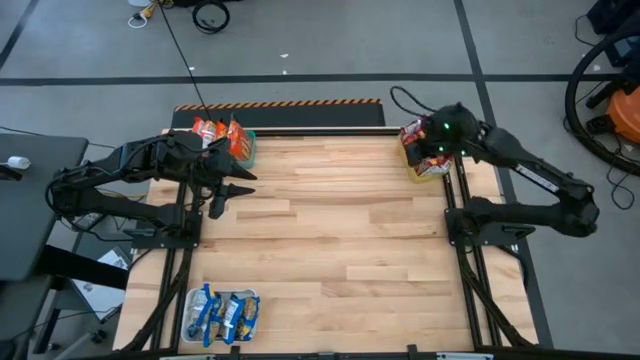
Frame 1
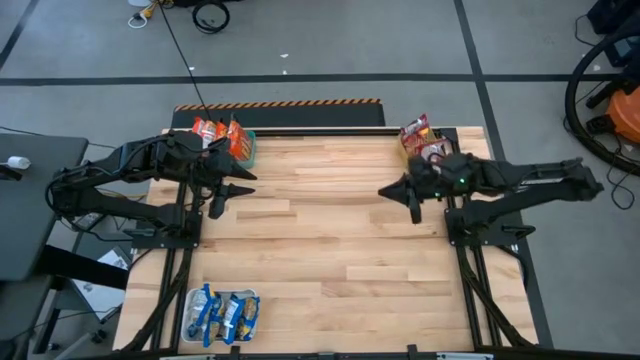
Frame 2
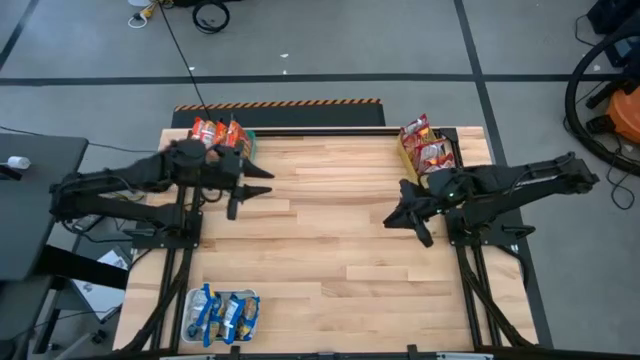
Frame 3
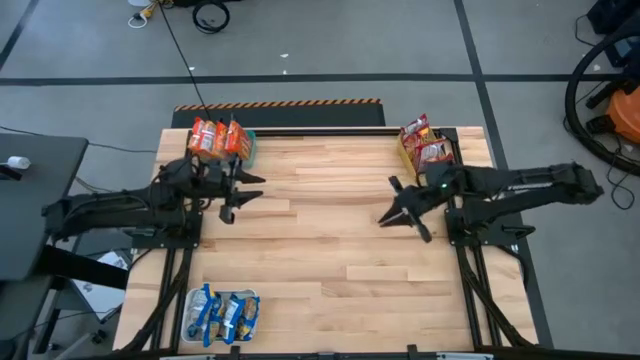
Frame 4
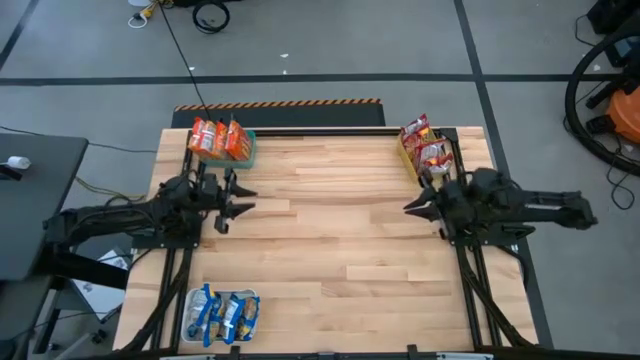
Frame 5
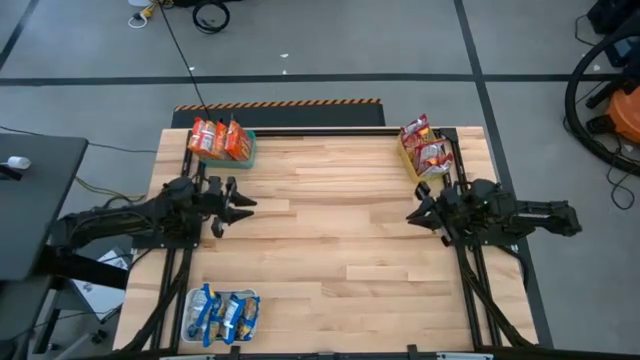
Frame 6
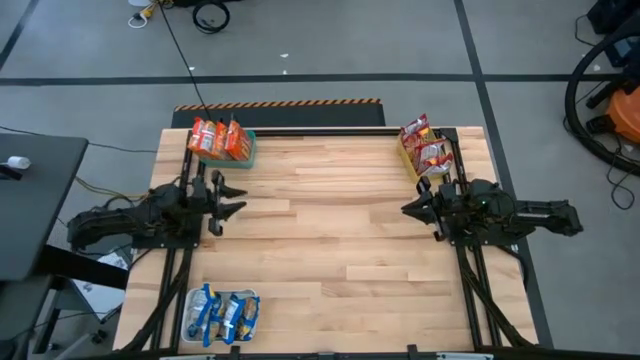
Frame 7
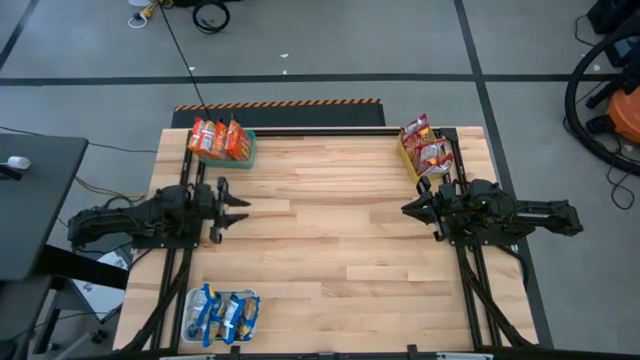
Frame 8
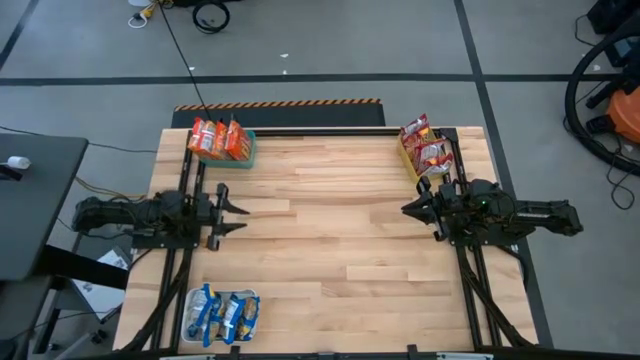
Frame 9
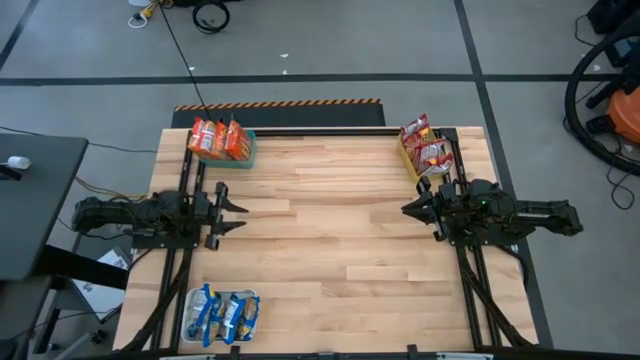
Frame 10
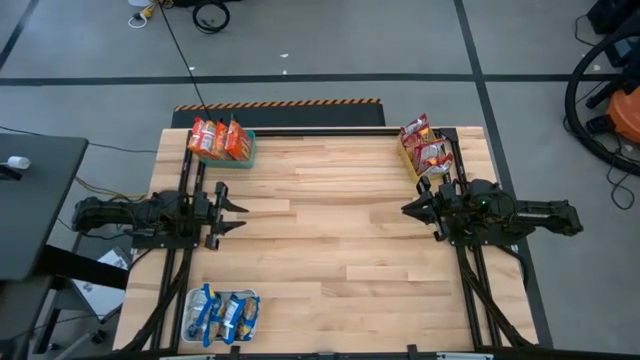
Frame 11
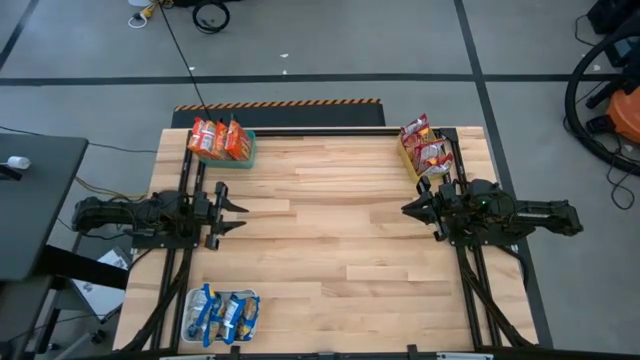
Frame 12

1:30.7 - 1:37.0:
Task: Sort Maruchan noodles
Return to Home Position

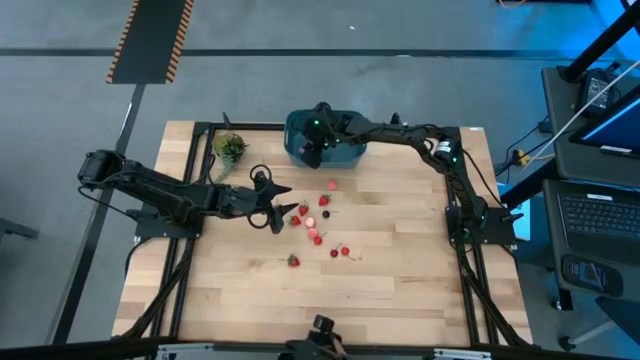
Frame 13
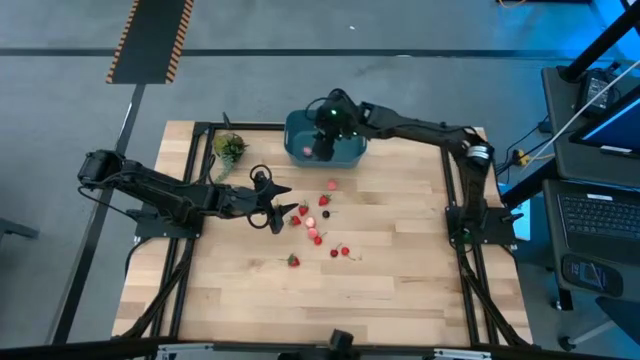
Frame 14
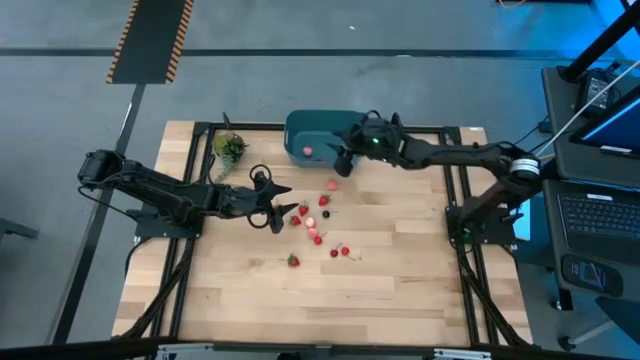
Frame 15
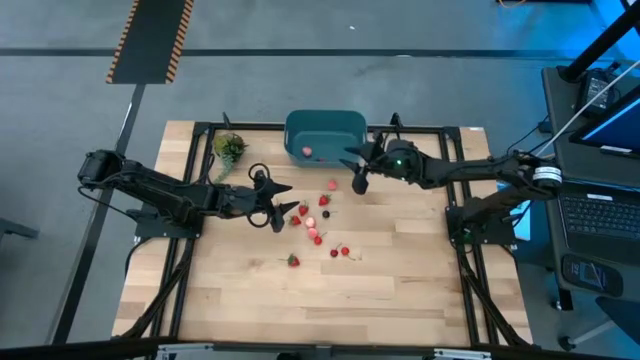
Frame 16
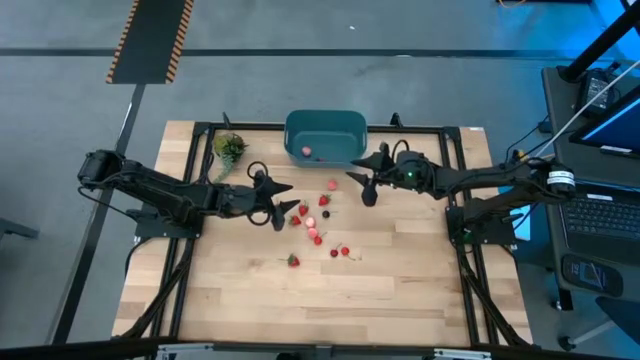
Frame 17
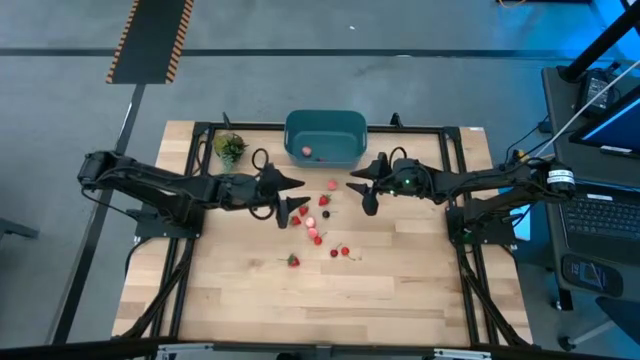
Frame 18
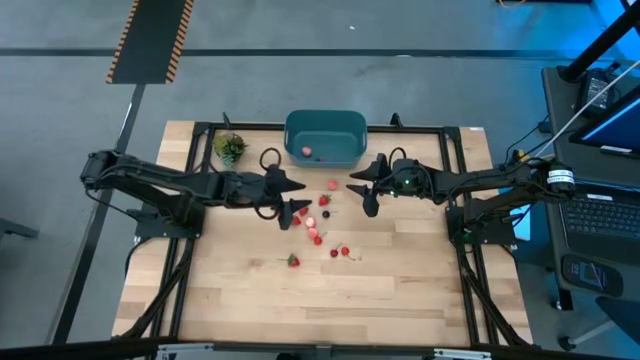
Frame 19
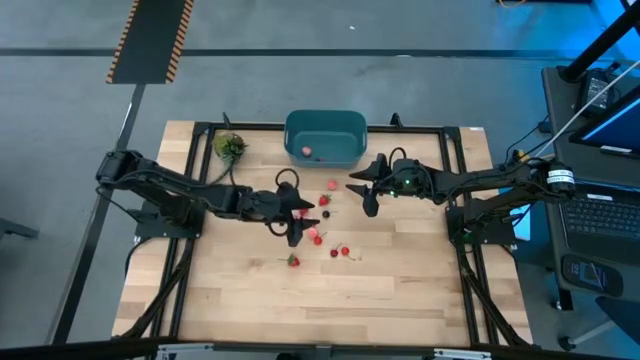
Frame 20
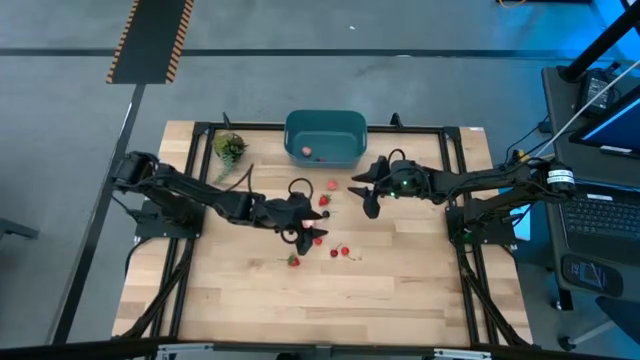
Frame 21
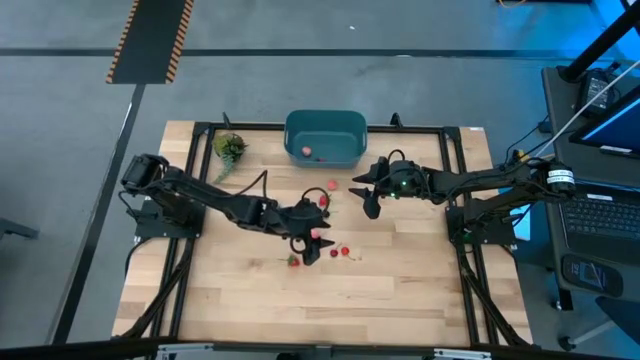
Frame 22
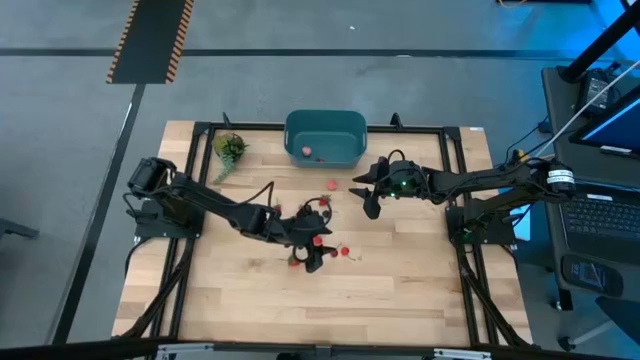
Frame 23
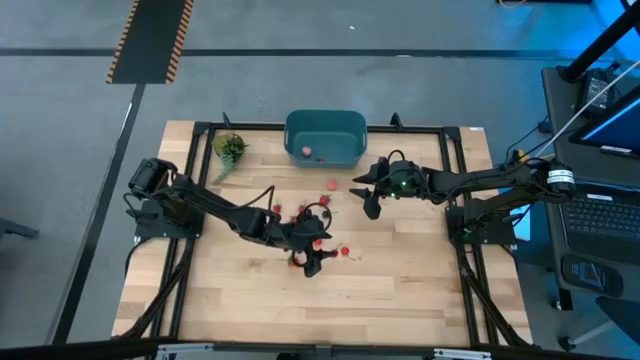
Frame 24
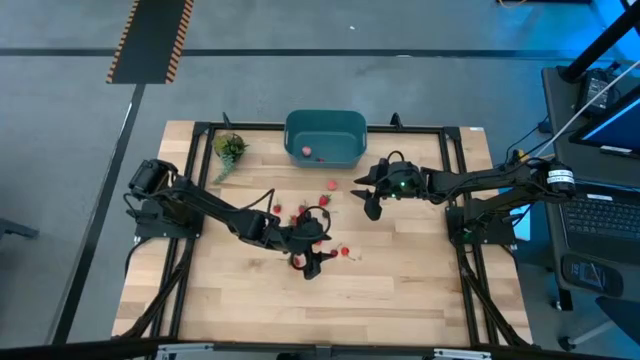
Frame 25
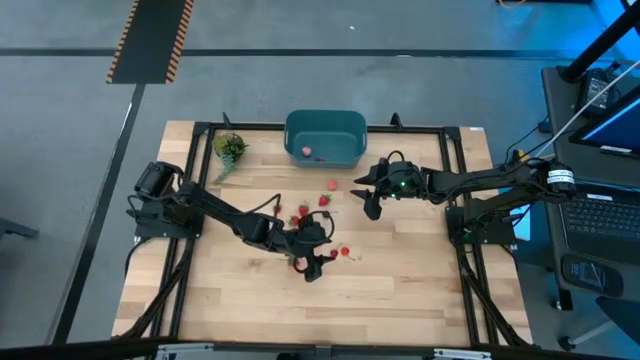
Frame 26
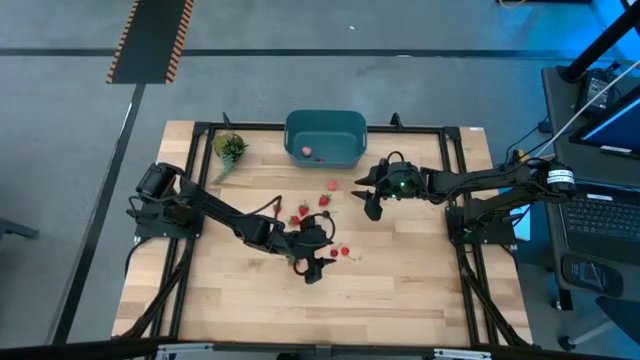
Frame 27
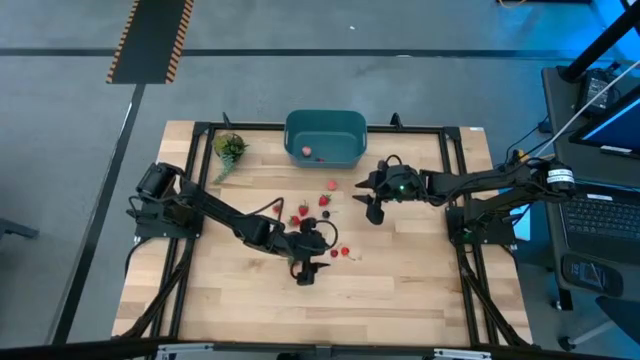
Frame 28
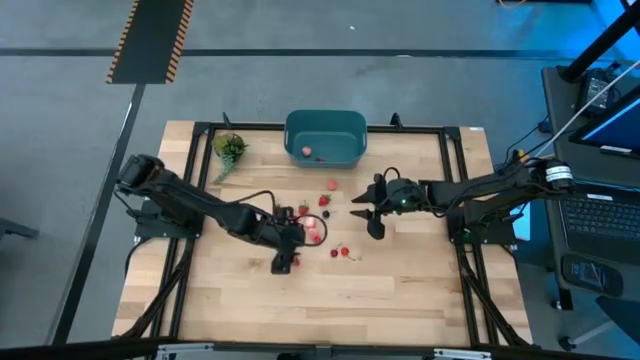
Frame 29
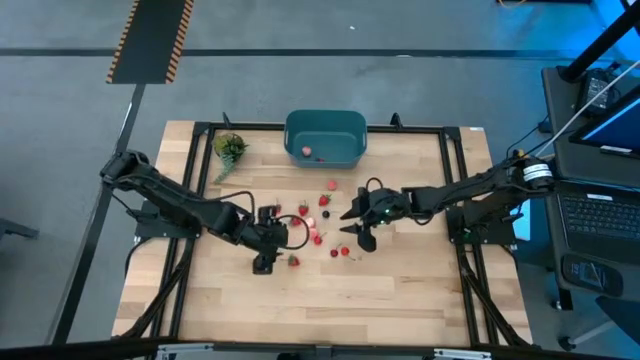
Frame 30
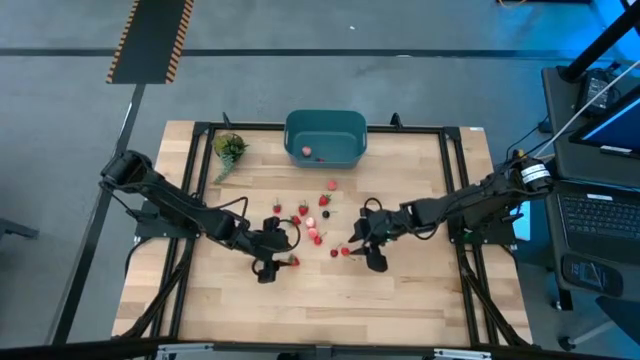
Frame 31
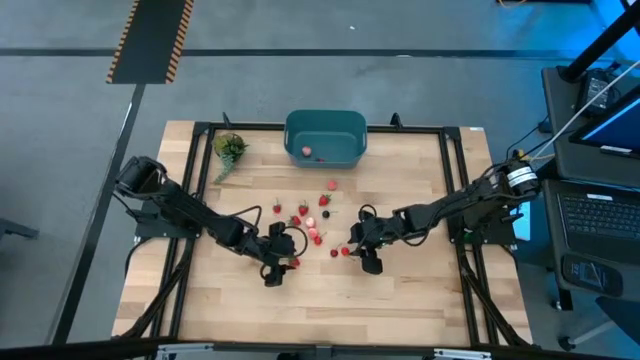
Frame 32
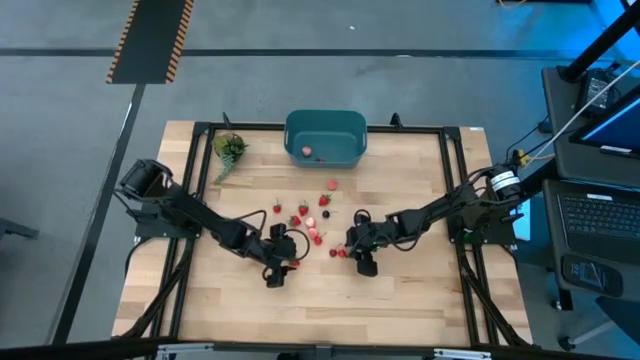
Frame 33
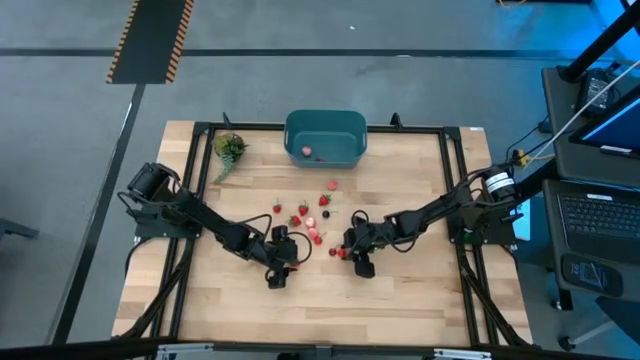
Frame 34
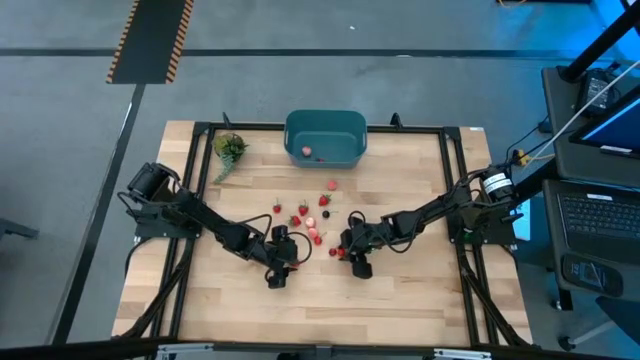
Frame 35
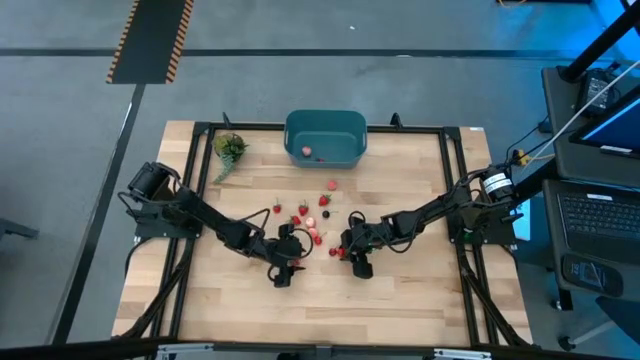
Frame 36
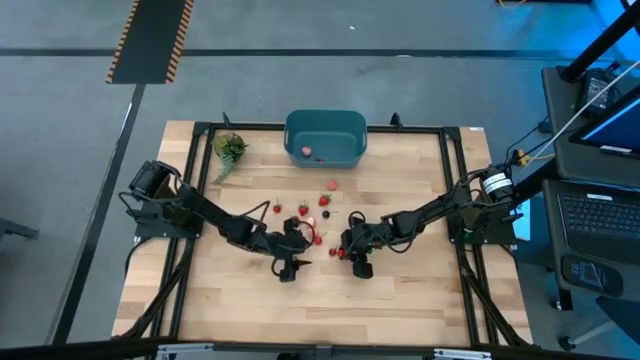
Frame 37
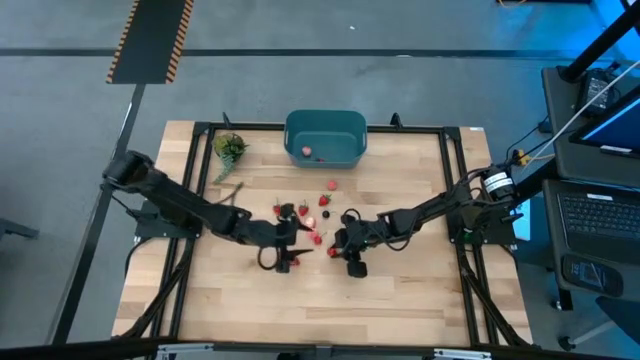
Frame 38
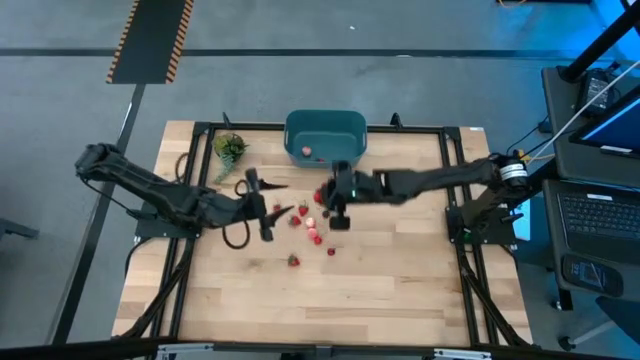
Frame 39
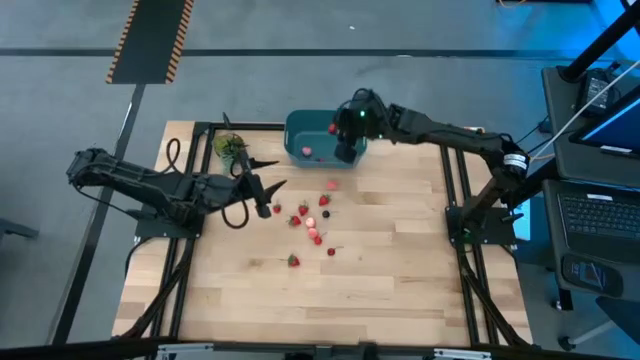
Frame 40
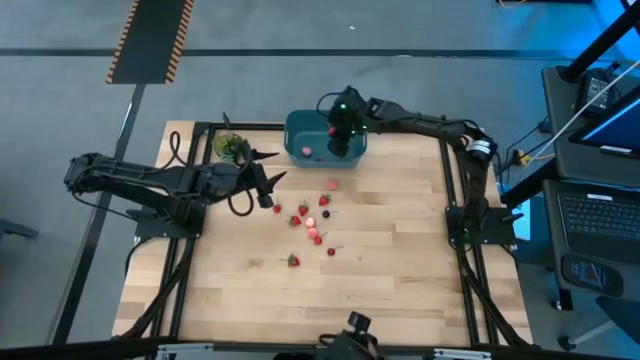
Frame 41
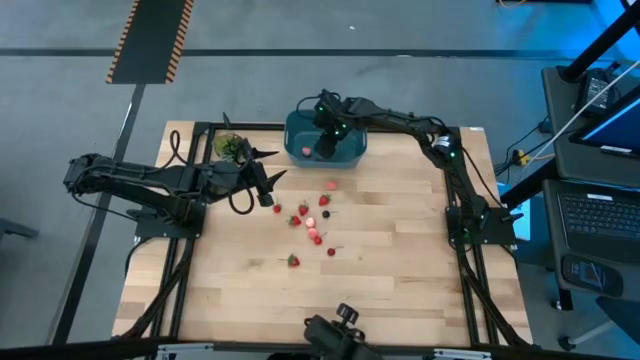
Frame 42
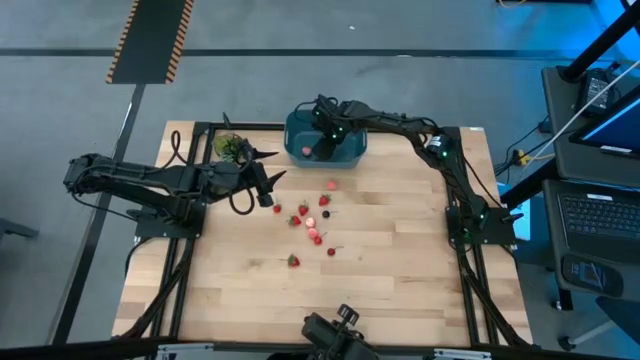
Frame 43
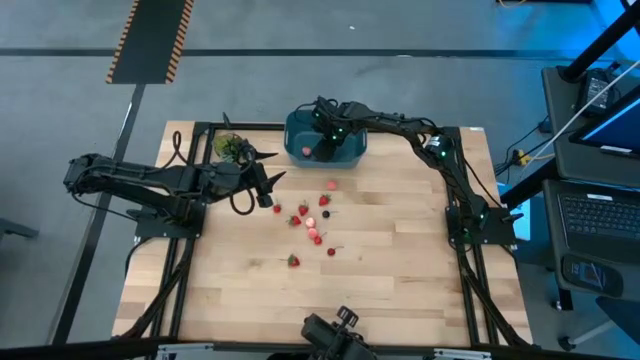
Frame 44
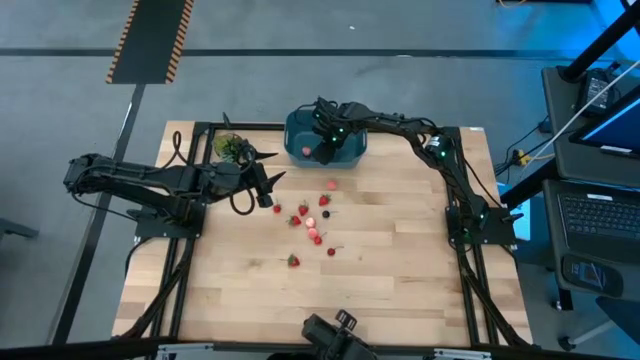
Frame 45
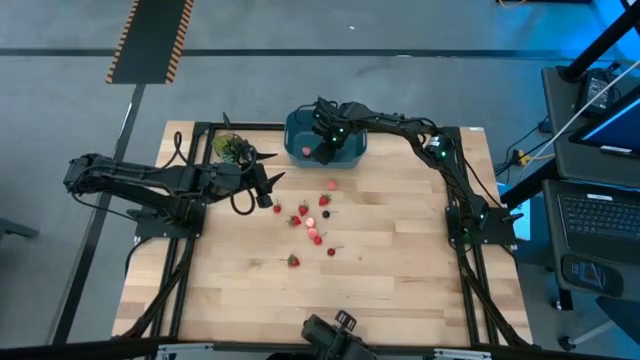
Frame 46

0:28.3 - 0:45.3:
Task: Pick and placing Produce into tupperware
Put the cherry into the blue bin
